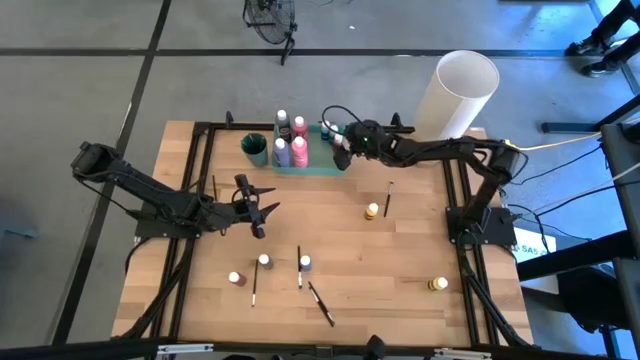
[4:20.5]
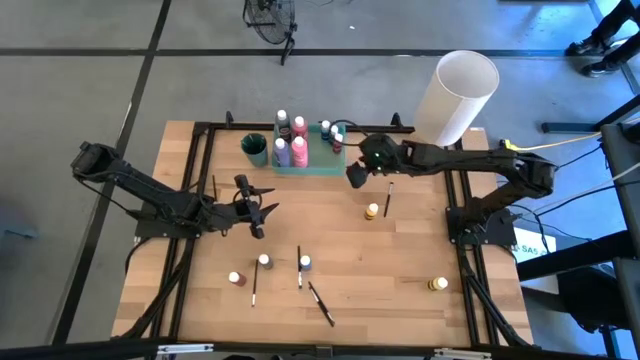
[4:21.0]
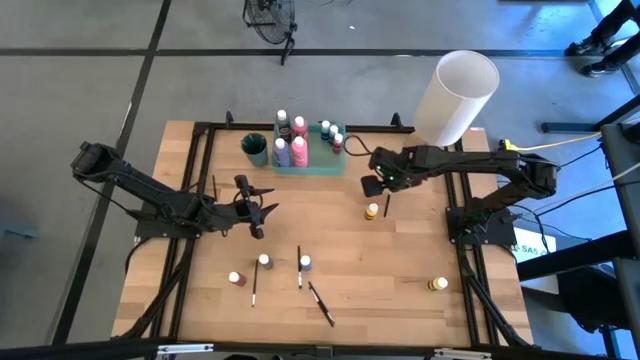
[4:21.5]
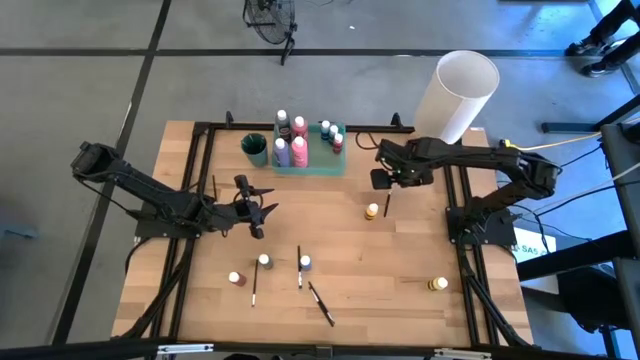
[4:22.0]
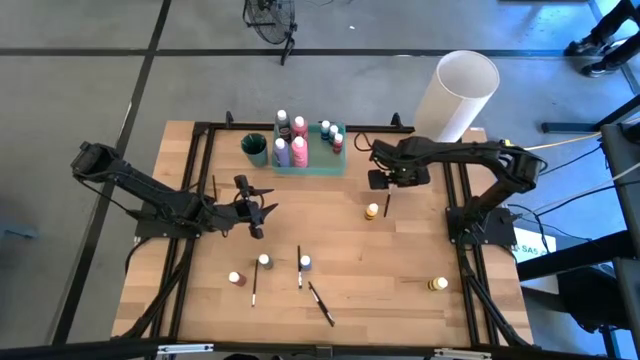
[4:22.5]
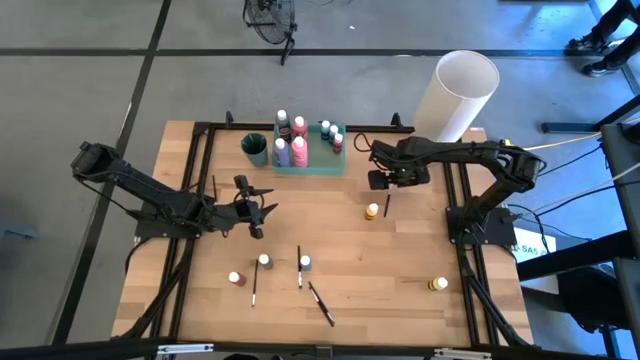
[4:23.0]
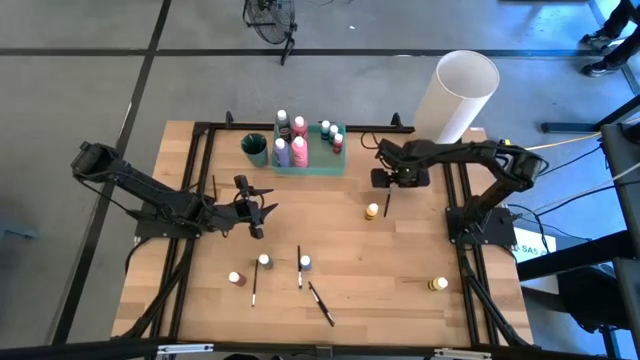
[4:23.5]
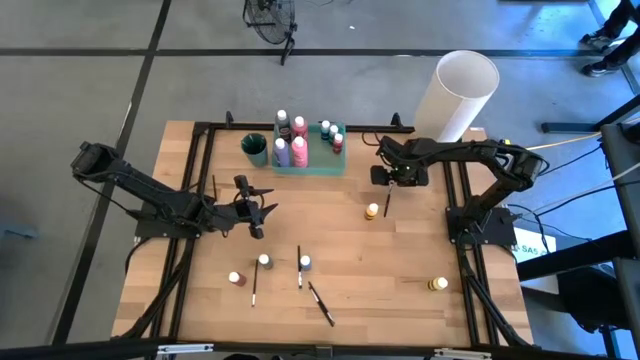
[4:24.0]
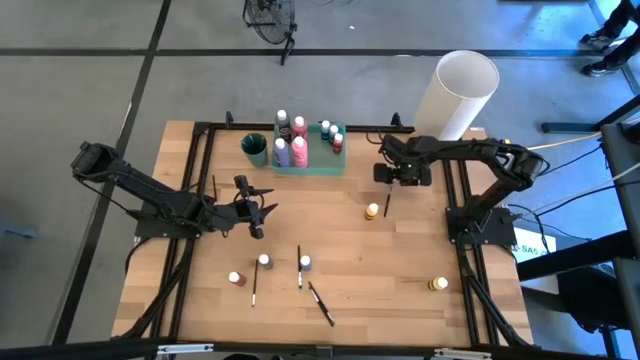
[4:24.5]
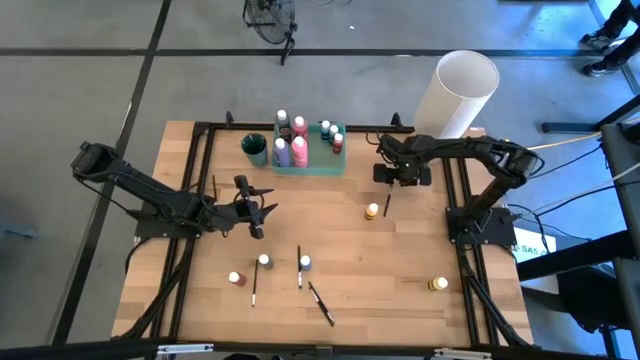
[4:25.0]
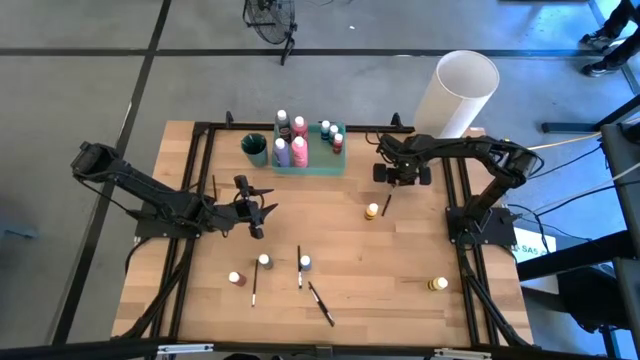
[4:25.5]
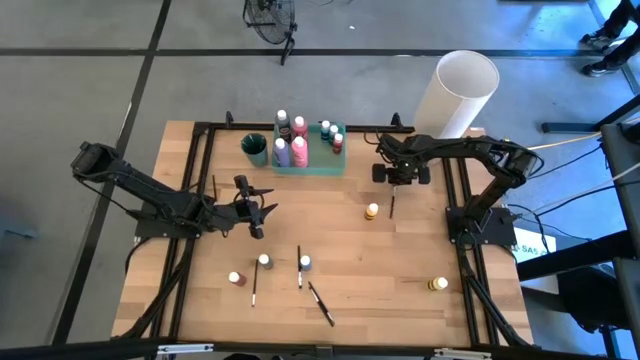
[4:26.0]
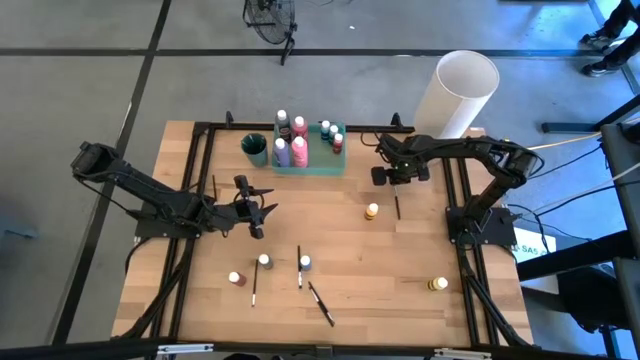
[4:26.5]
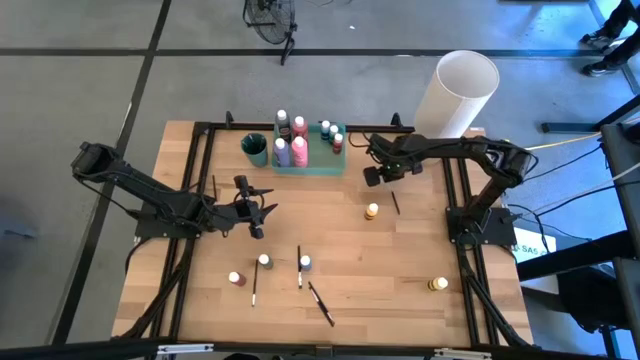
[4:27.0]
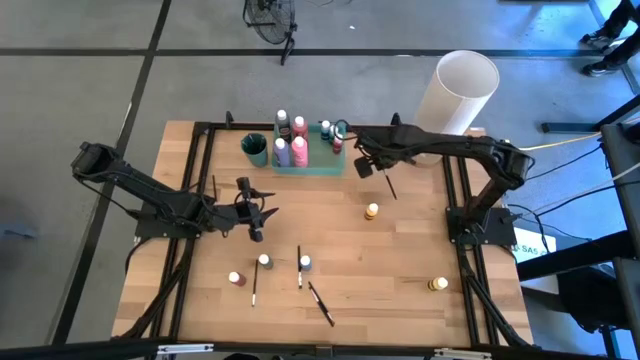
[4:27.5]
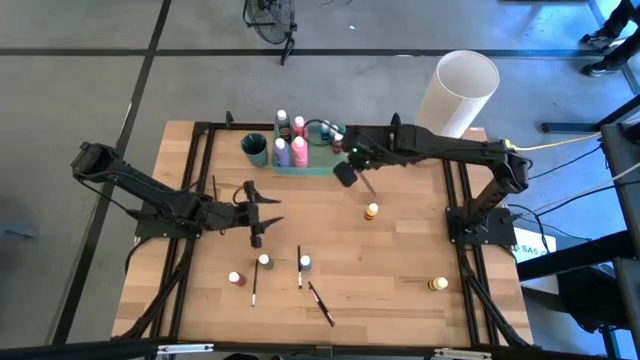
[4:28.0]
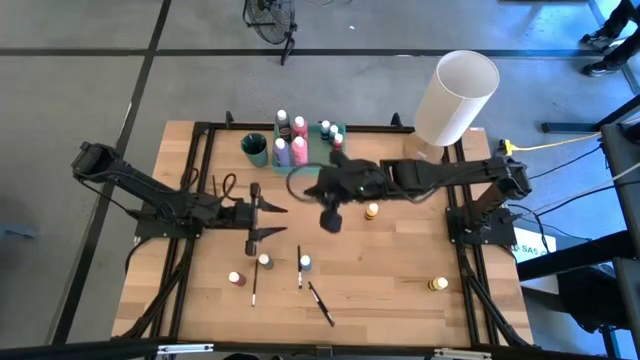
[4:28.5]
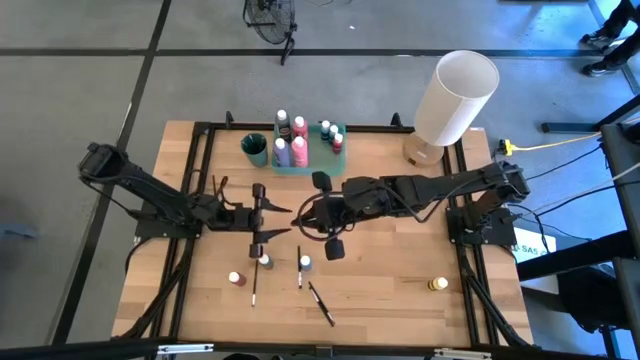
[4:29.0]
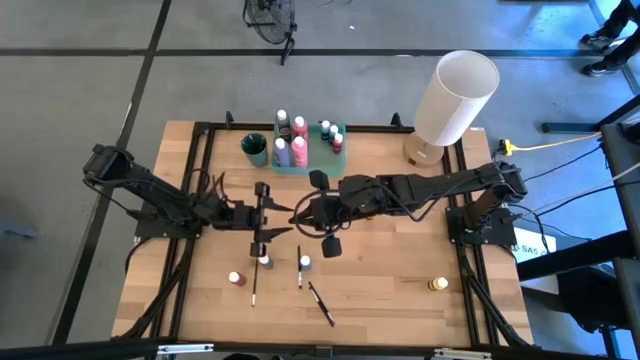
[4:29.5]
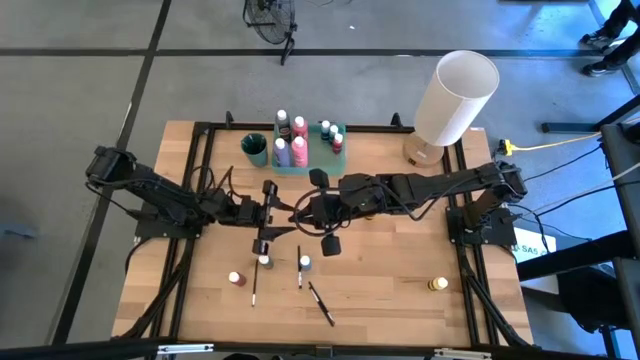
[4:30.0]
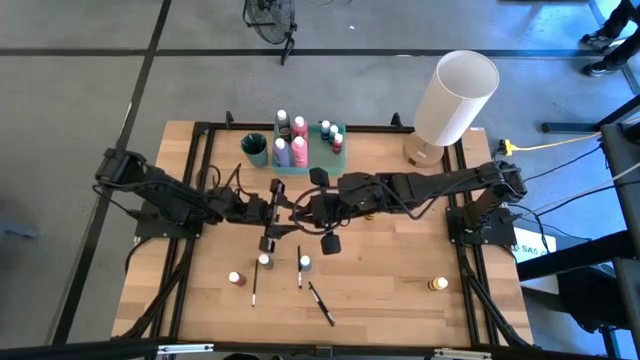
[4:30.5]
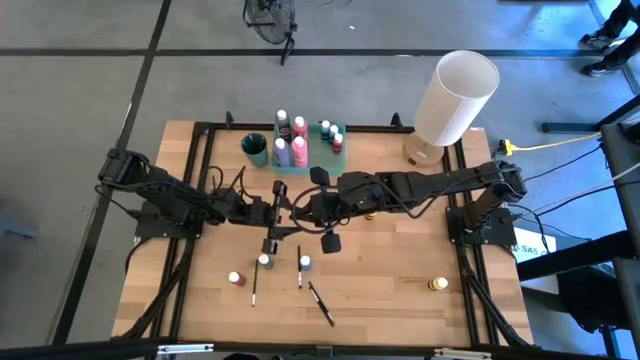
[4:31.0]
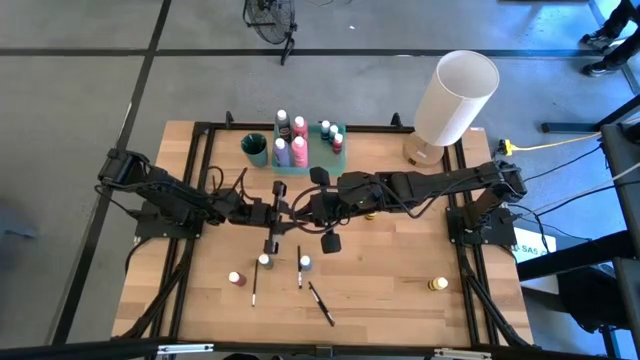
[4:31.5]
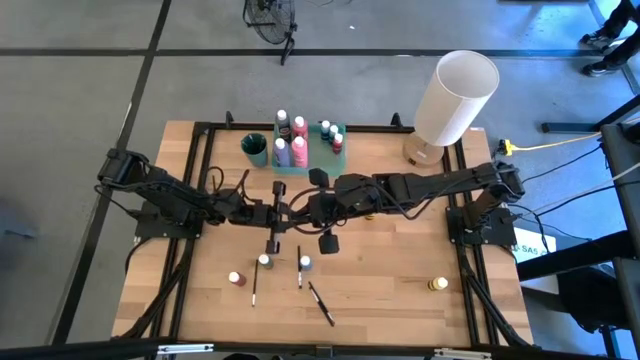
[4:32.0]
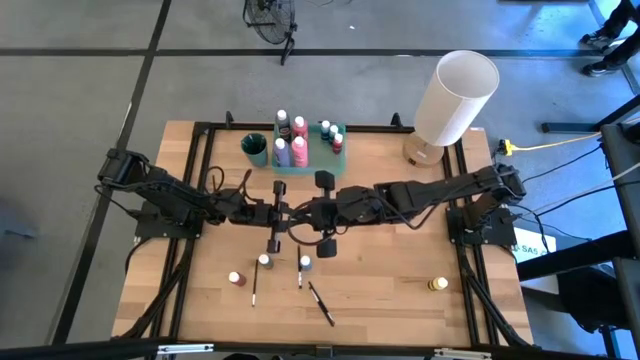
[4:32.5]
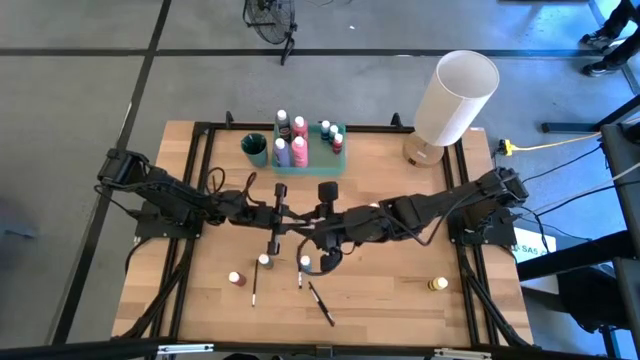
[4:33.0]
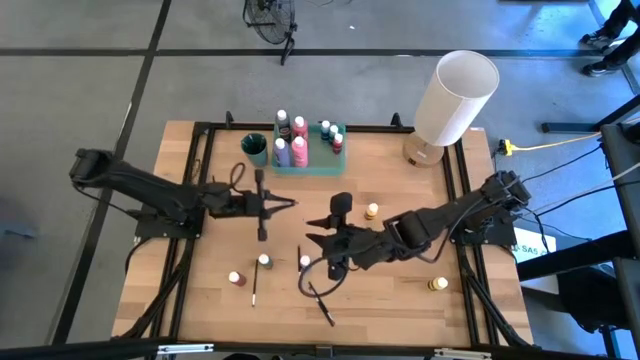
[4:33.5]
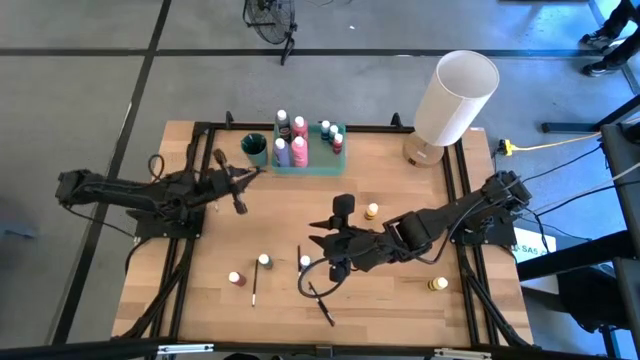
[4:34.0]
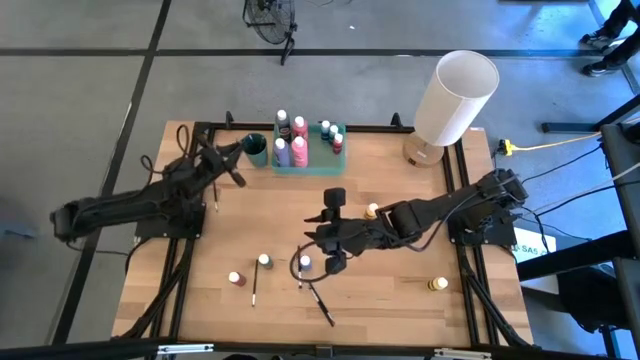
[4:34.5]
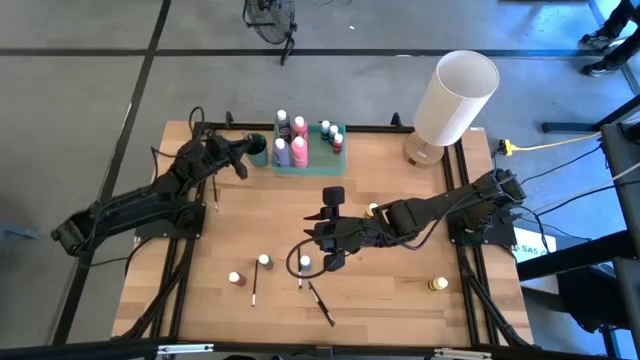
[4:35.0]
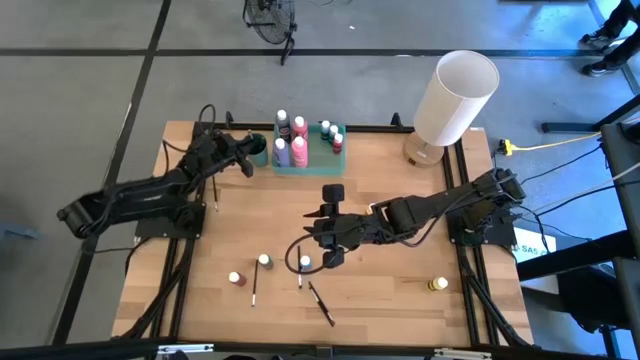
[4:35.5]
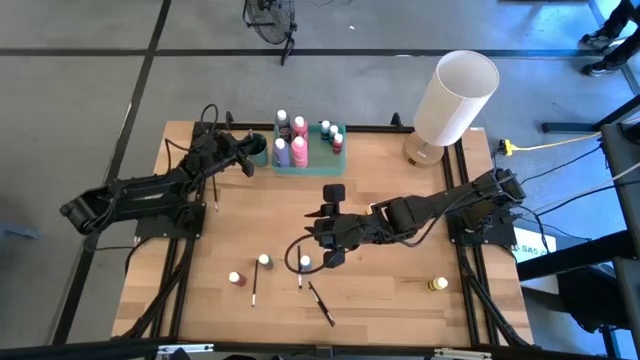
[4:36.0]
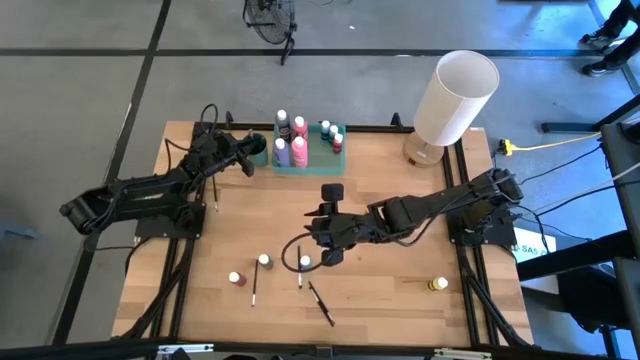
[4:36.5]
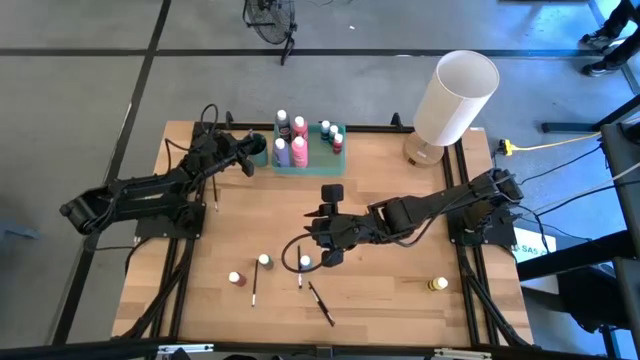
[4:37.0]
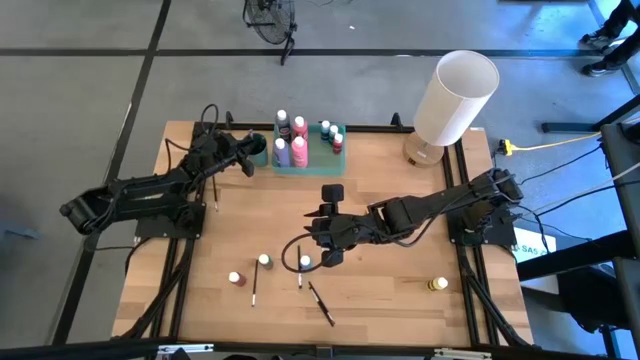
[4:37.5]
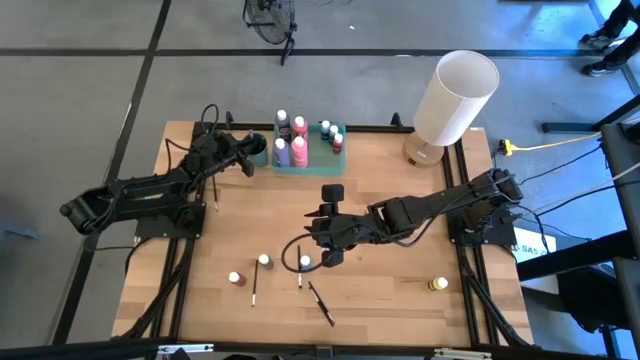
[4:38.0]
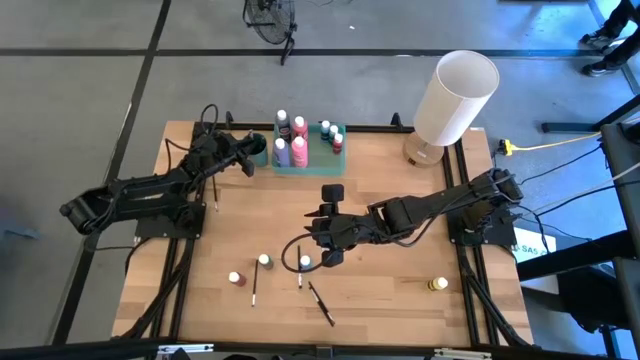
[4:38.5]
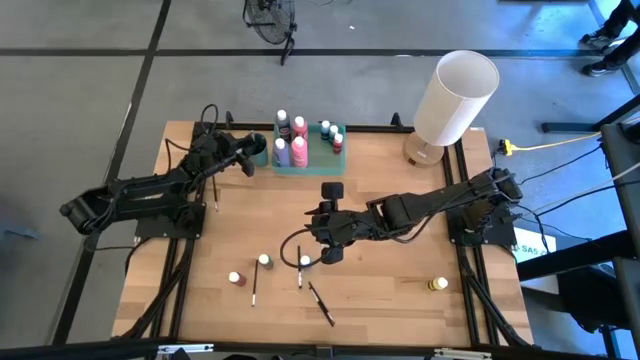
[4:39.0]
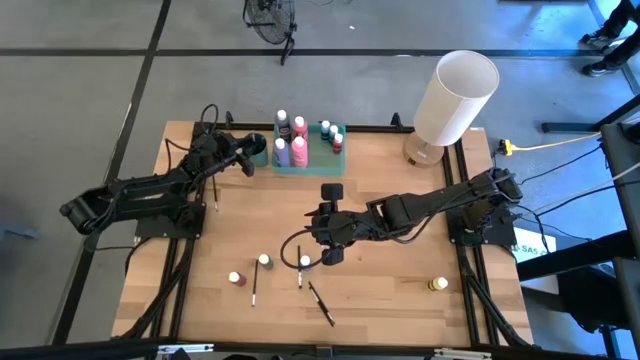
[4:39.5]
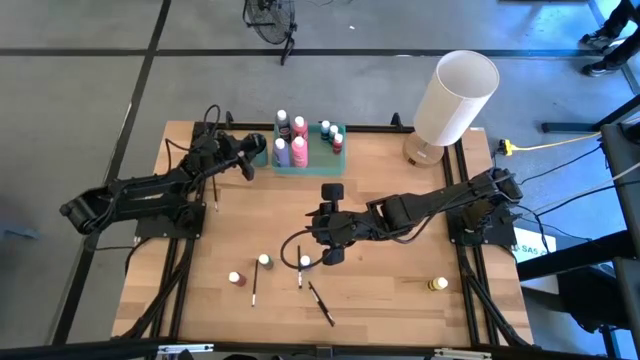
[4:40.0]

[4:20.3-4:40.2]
Task: Pick & Place Paint Supplies
Put the silver paintbrush into the green cup

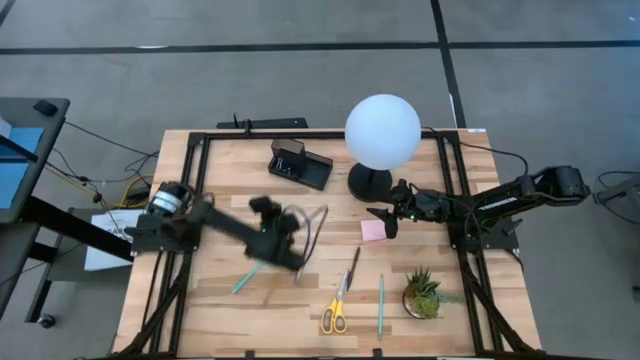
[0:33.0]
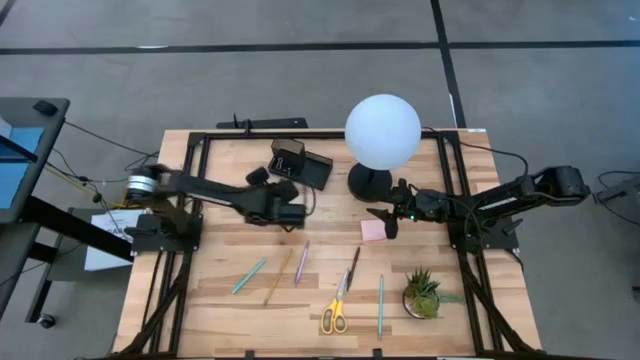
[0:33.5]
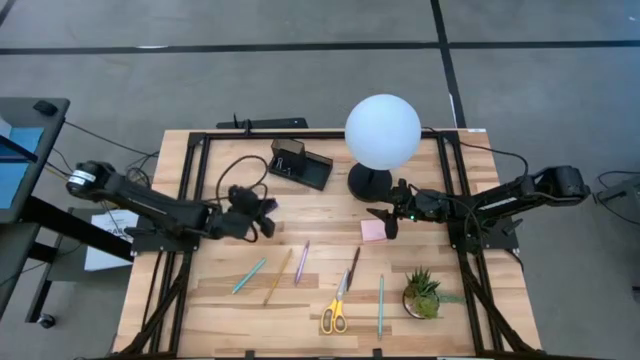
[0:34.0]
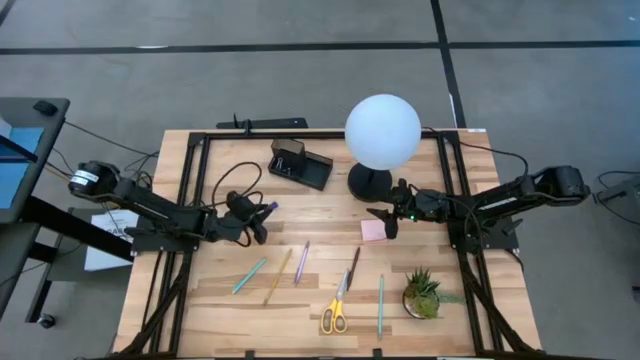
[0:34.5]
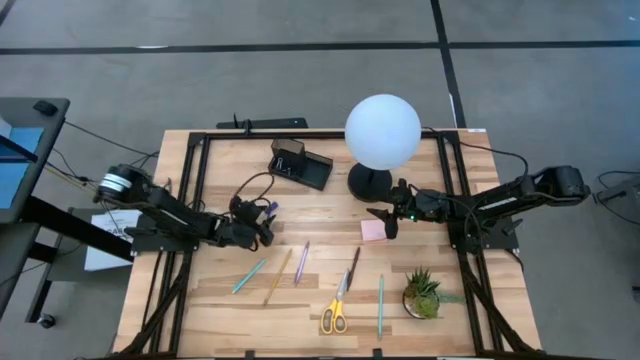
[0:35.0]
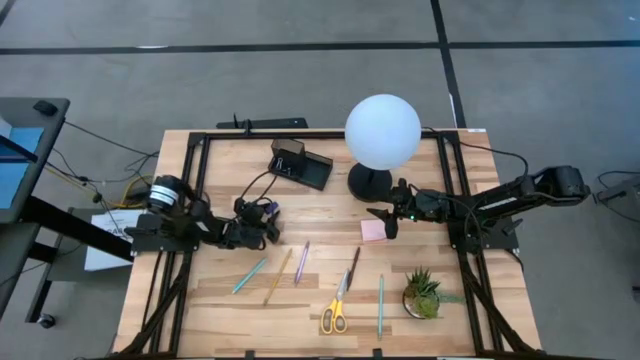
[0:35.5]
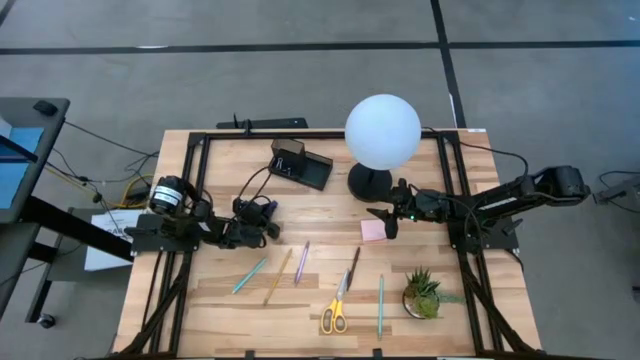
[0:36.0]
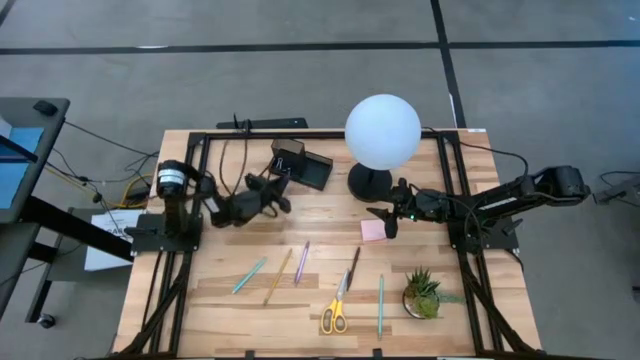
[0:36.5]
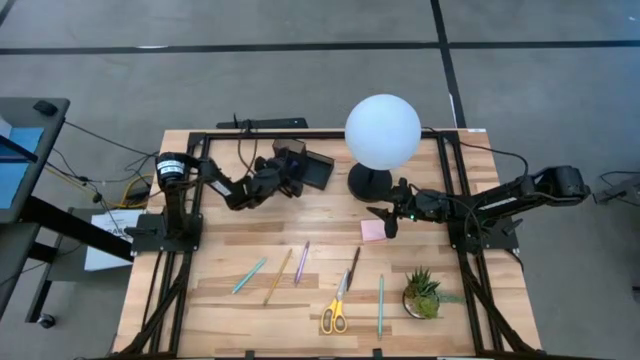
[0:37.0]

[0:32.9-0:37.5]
Task: Pick and place office supplies into organizer
Put the blue eraser into the black desk organizer
